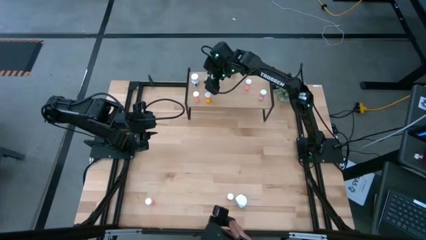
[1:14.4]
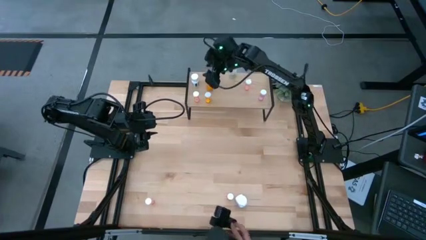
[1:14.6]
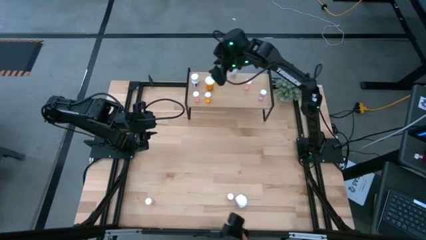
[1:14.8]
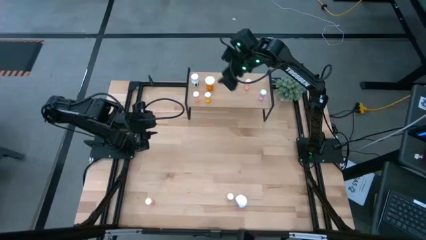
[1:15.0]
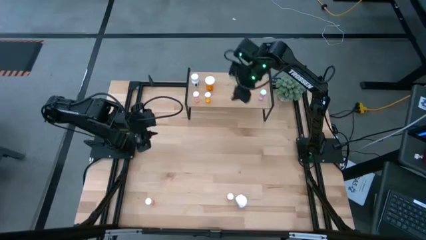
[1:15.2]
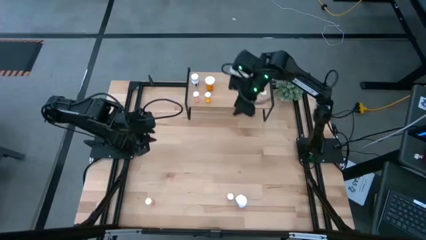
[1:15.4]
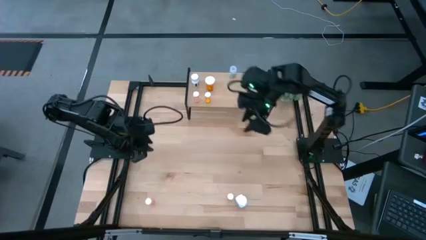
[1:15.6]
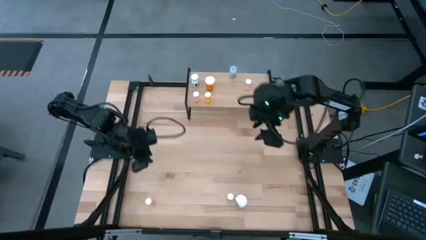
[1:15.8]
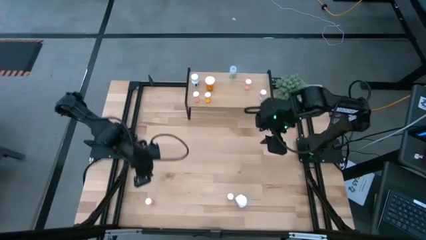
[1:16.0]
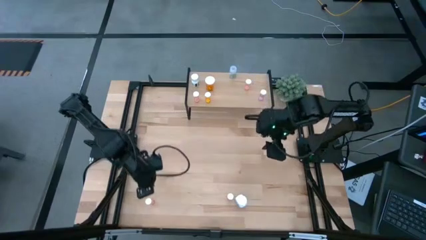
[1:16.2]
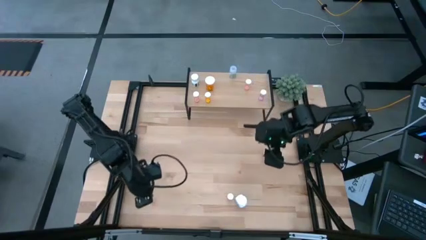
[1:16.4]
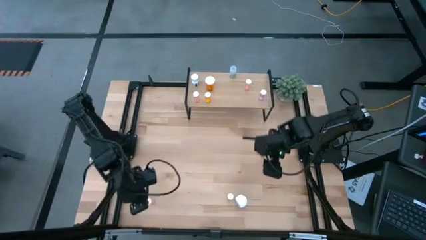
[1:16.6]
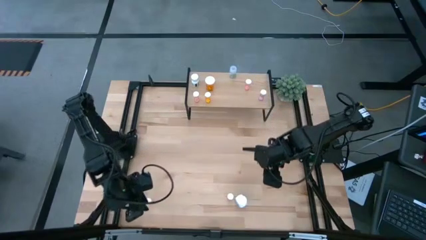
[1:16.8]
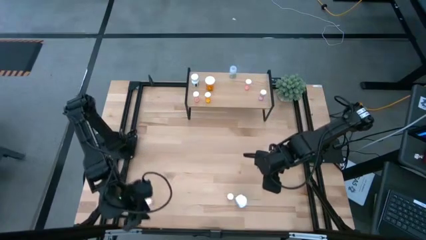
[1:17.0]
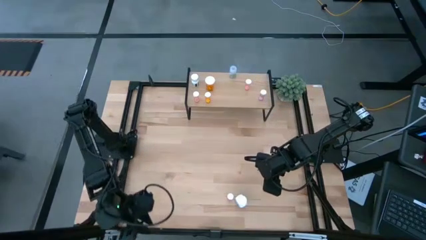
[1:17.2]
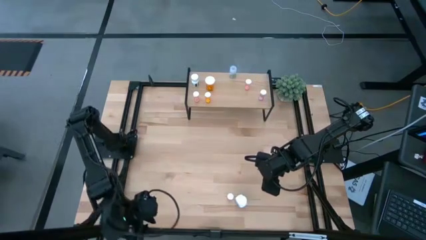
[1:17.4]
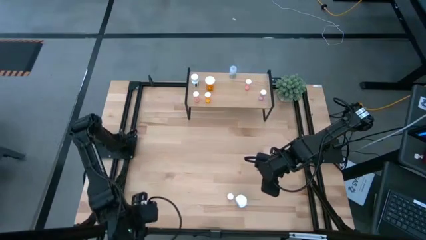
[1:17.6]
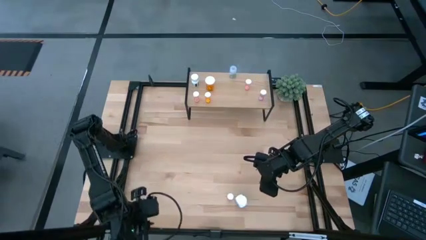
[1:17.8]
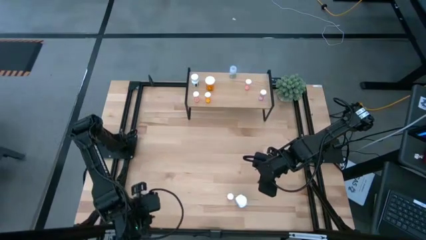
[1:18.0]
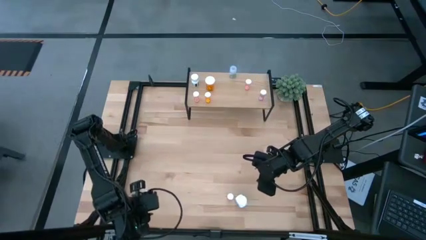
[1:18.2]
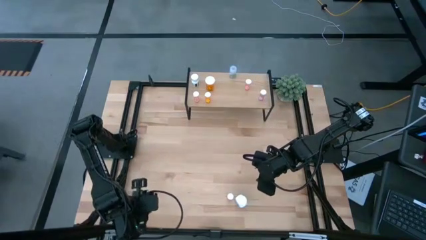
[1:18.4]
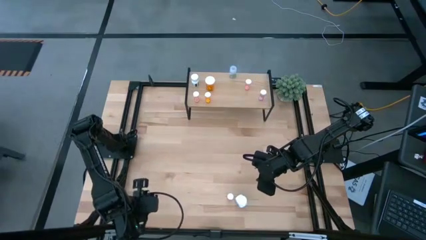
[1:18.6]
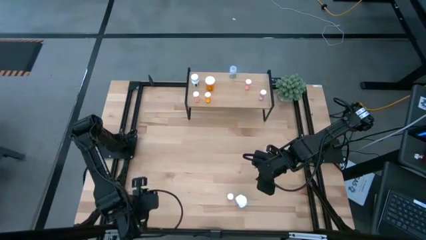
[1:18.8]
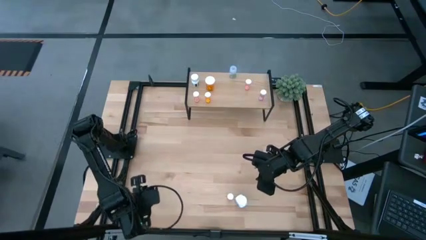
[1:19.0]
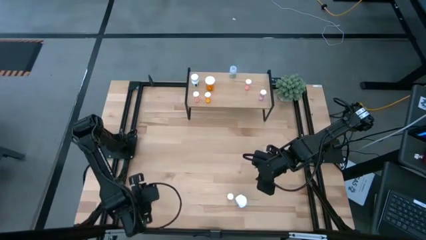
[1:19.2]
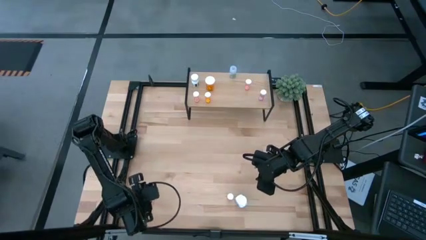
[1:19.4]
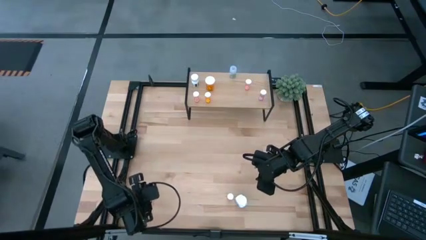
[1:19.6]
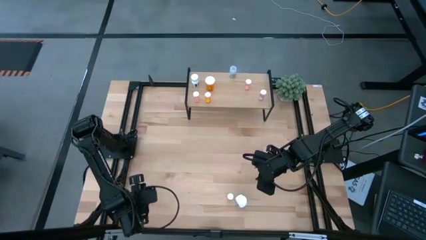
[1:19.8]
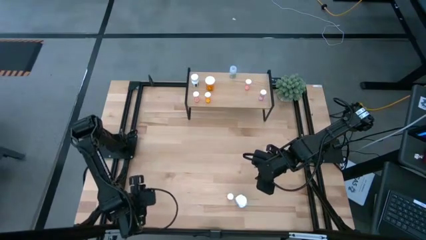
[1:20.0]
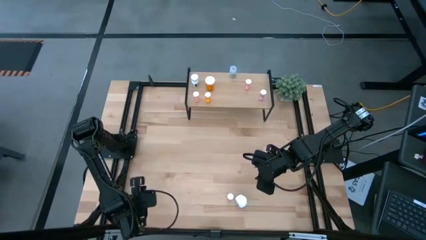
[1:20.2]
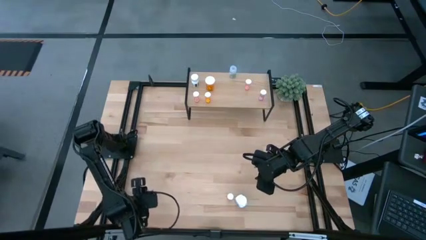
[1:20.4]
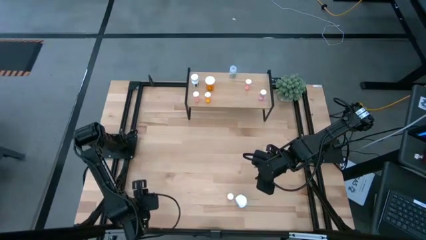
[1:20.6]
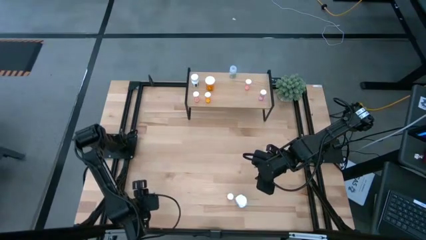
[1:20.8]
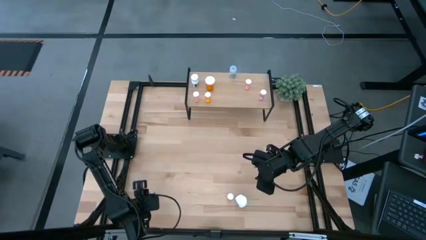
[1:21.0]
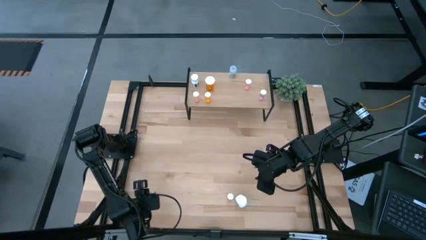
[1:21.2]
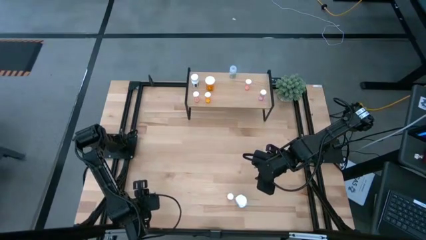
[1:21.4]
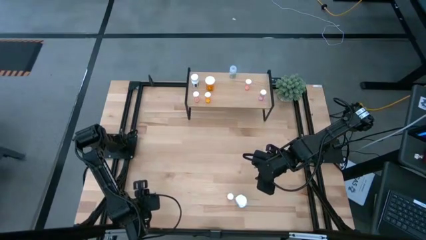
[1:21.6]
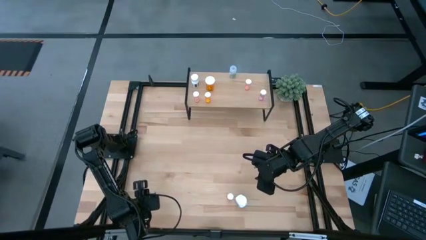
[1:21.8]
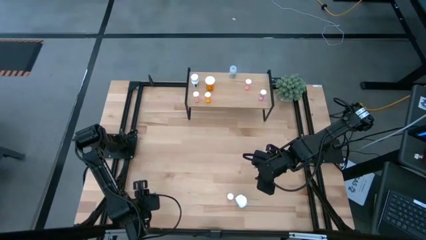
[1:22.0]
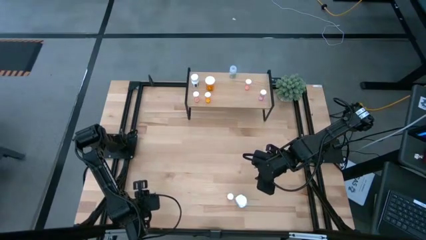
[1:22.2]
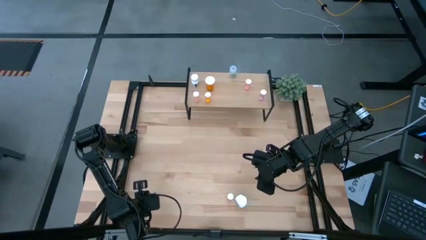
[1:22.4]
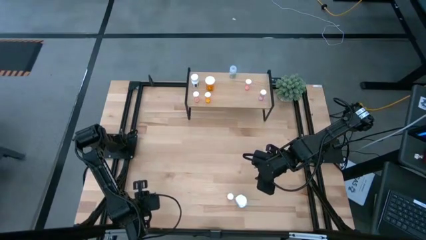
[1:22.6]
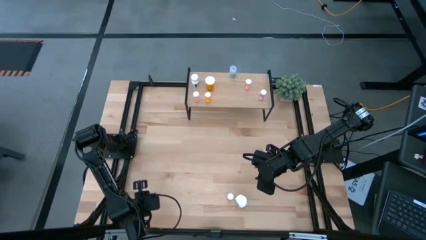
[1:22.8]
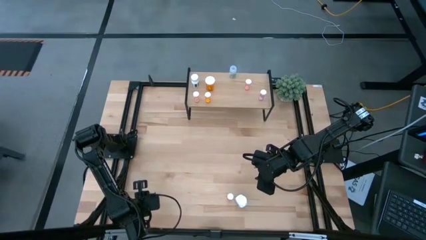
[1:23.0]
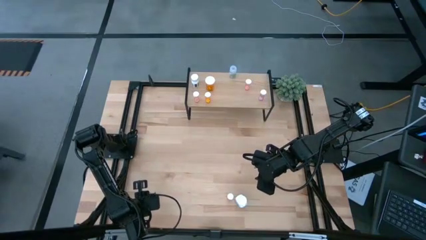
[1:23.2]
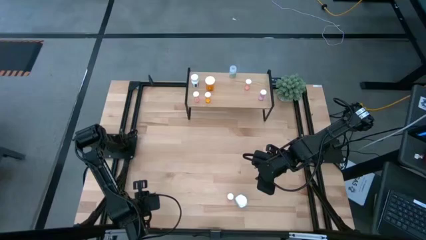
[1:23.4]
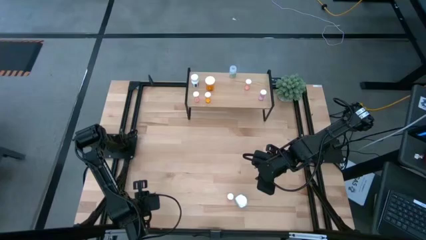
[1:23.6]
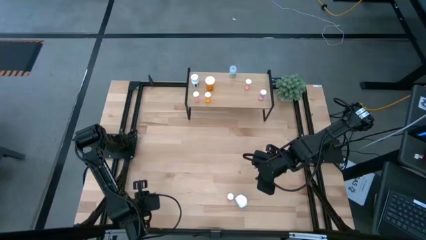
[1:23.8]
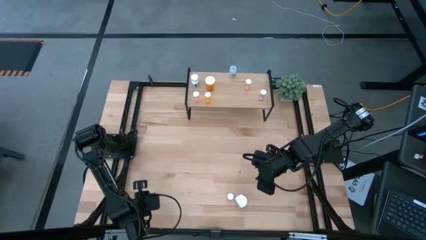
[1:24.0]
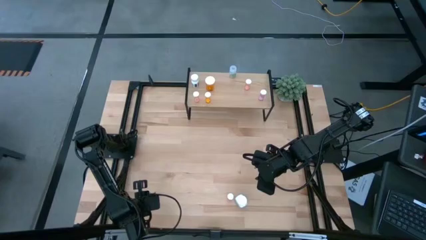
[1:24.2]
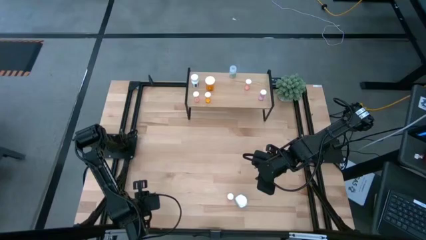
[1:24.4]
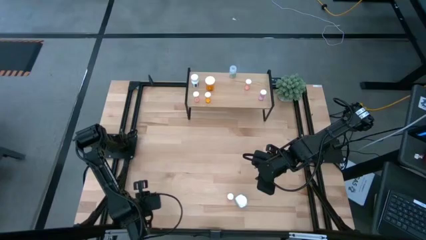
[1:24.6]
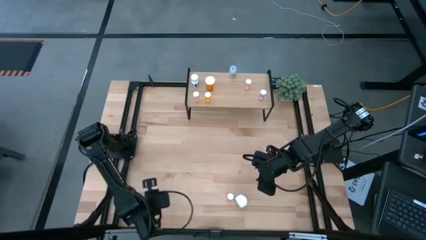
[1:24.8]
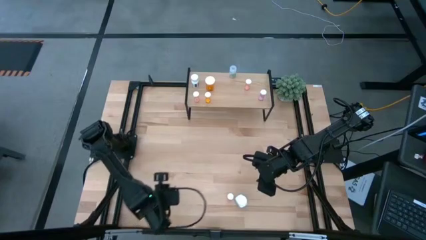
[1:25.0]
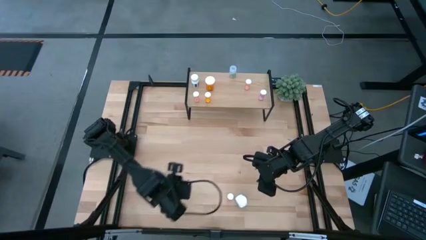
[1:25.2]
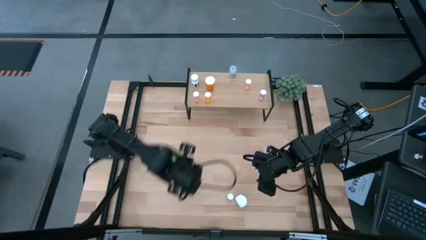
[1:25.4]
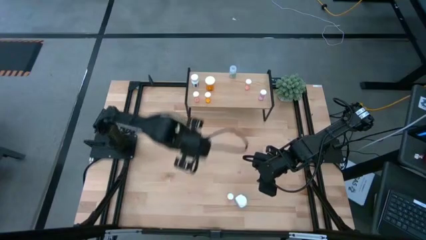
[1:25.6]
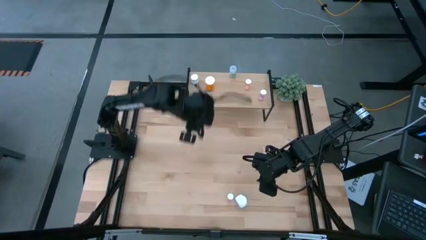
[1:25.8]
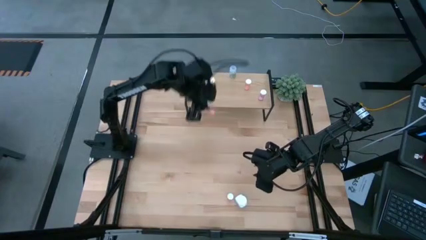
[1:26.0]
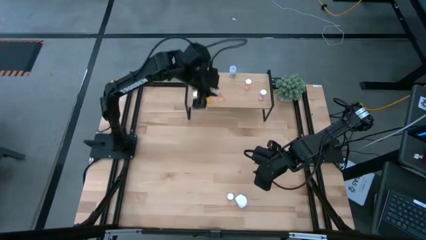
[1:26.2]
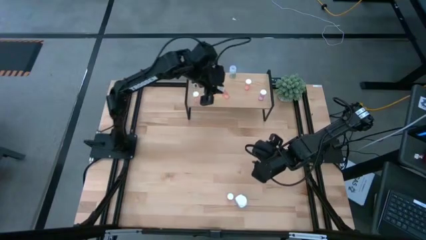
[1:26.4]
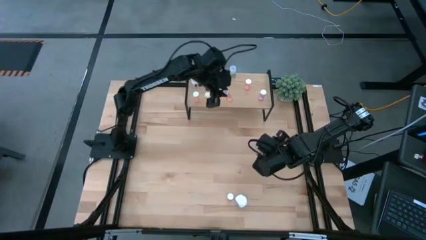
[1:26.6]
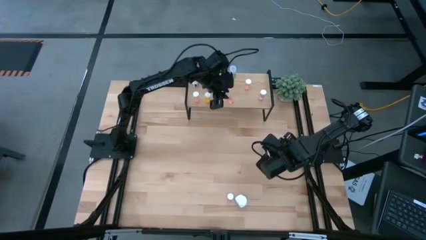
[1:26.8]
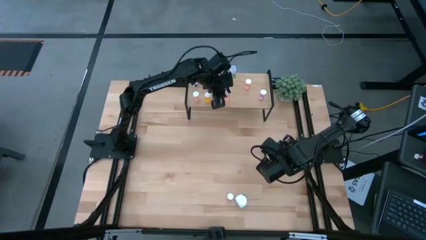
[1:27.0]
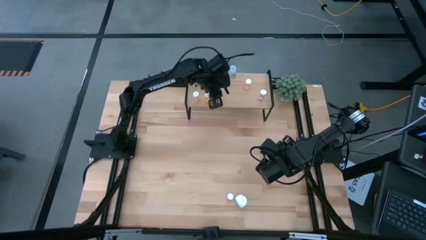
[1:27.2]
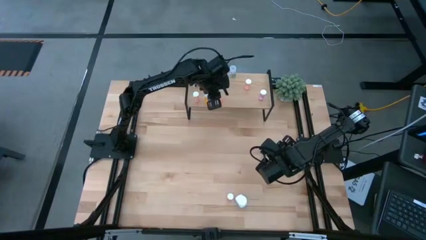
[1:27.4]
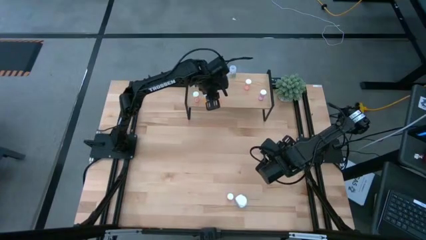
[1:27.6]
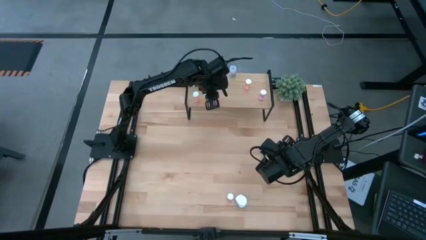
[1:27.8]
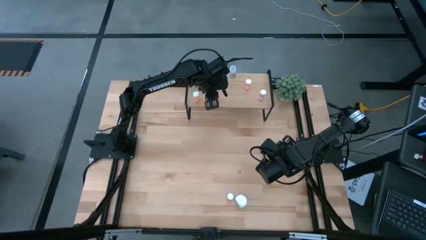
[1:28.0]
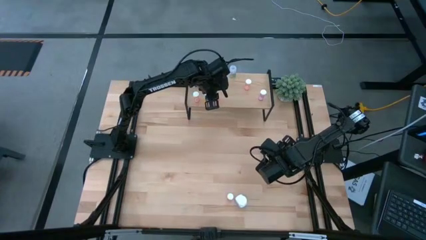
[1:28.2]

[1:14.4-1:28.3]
Task: Pick and place medicine bottles onto shelf by color
Put the left pink pill bottle on the shelf
